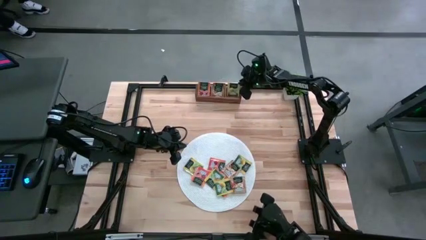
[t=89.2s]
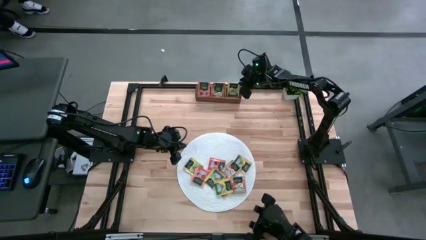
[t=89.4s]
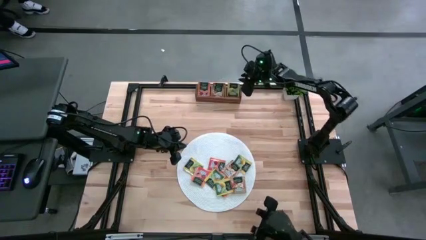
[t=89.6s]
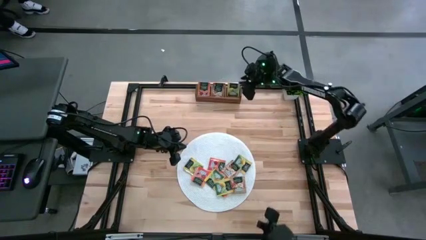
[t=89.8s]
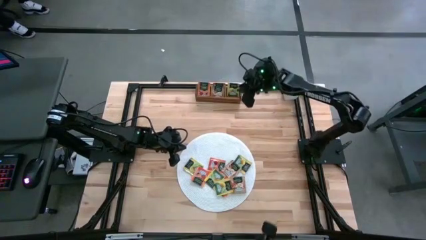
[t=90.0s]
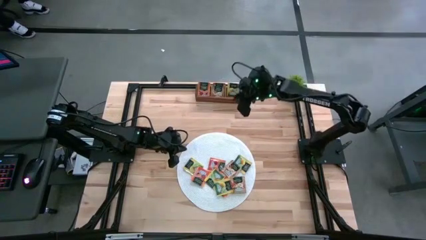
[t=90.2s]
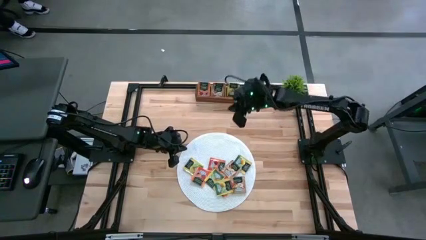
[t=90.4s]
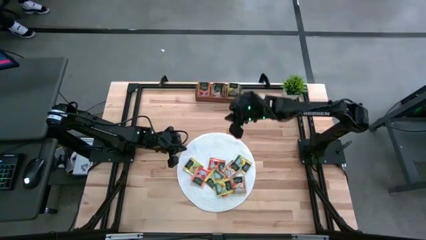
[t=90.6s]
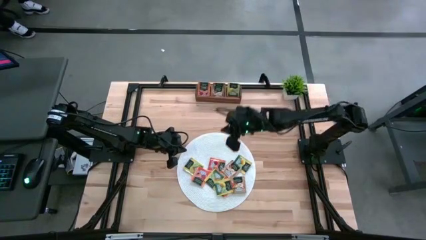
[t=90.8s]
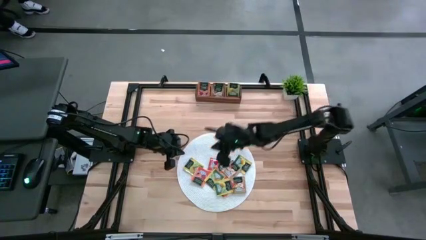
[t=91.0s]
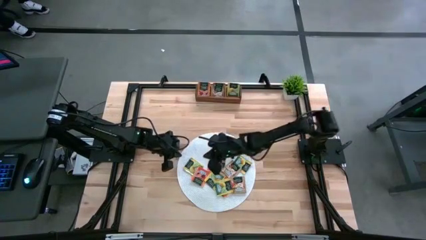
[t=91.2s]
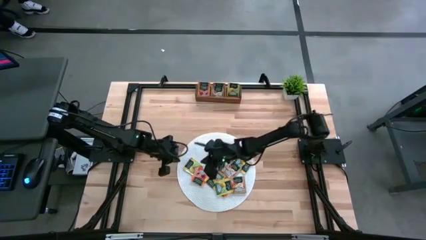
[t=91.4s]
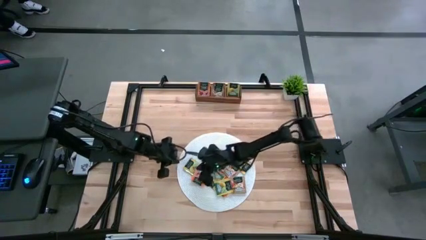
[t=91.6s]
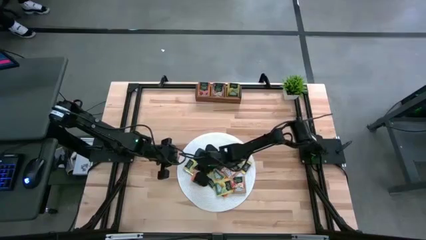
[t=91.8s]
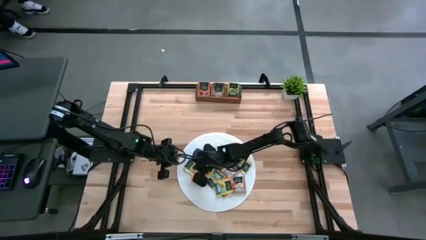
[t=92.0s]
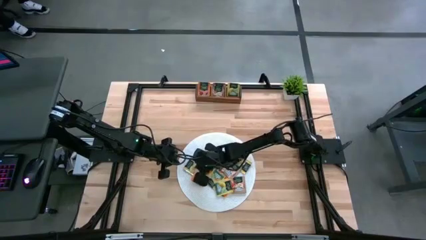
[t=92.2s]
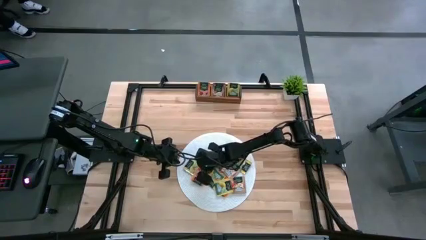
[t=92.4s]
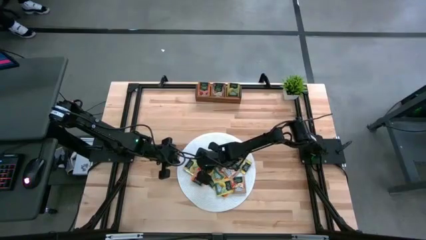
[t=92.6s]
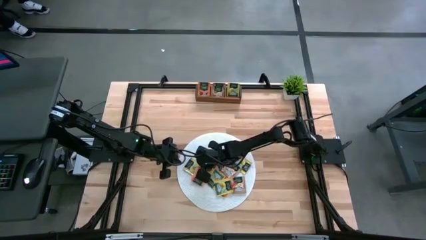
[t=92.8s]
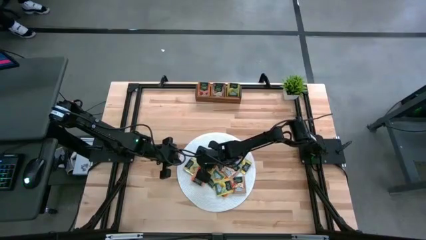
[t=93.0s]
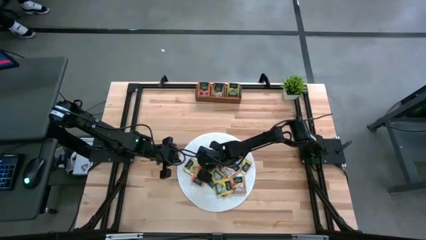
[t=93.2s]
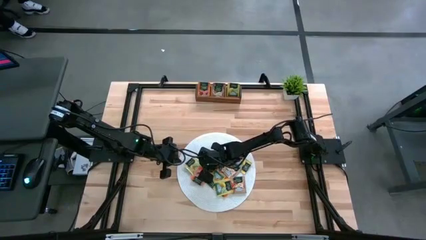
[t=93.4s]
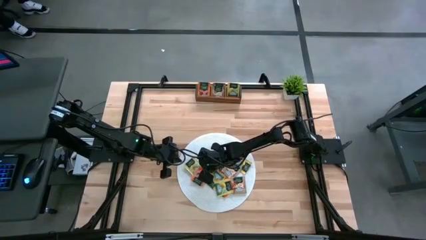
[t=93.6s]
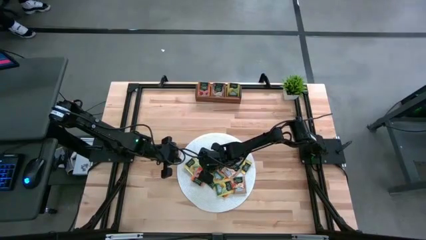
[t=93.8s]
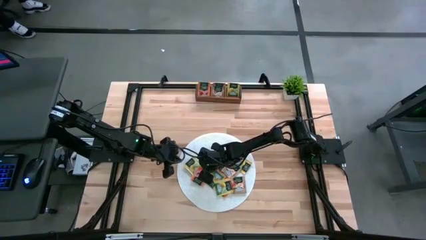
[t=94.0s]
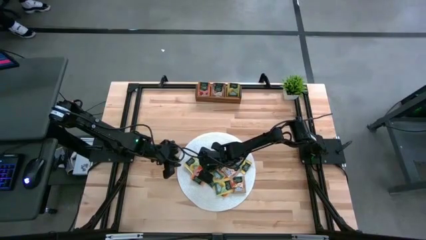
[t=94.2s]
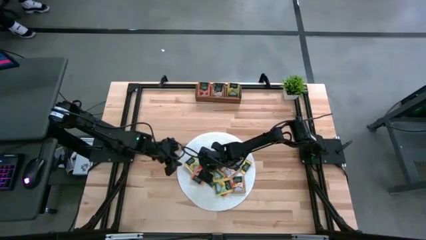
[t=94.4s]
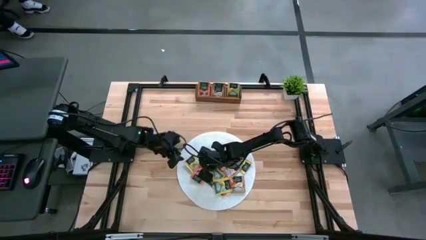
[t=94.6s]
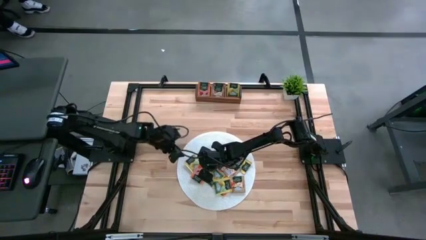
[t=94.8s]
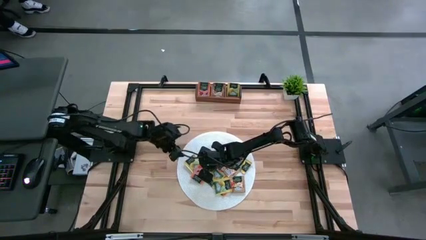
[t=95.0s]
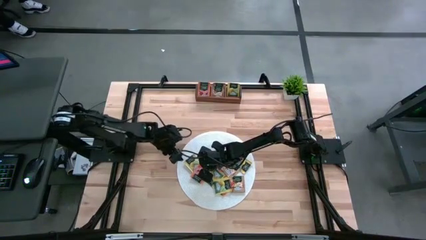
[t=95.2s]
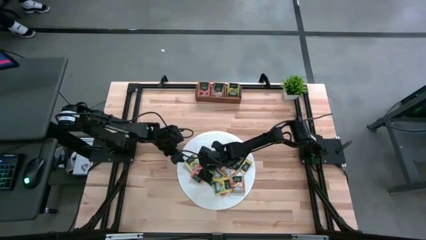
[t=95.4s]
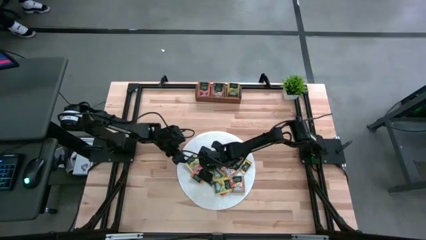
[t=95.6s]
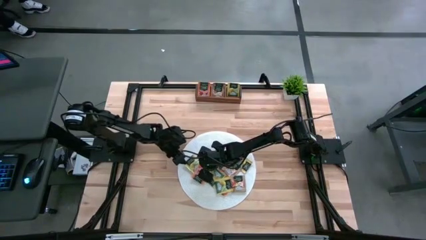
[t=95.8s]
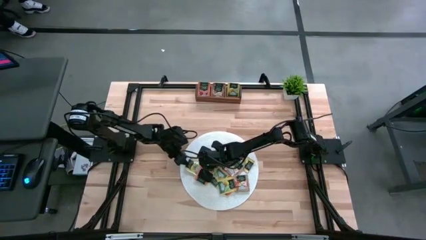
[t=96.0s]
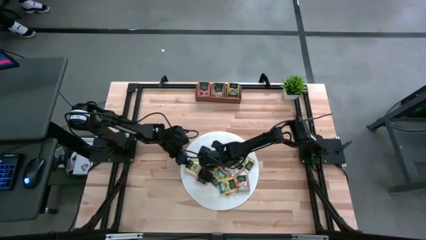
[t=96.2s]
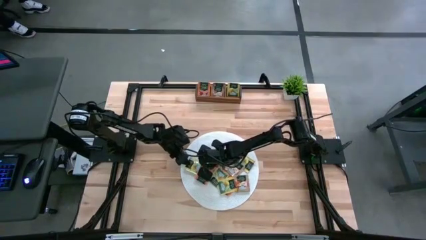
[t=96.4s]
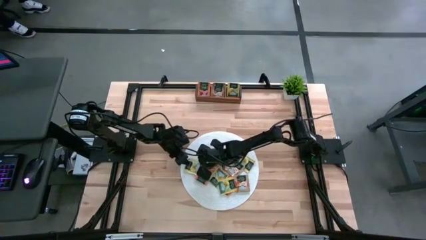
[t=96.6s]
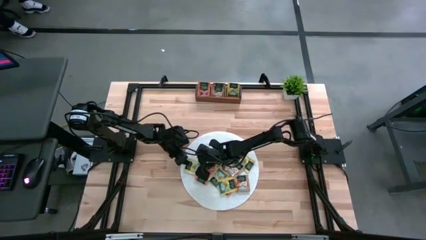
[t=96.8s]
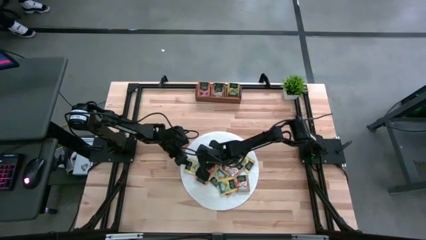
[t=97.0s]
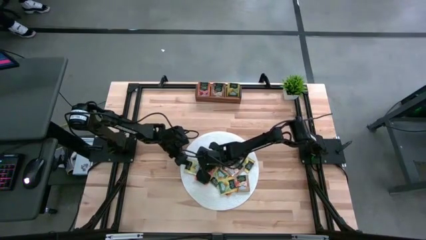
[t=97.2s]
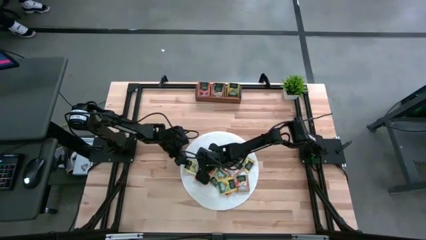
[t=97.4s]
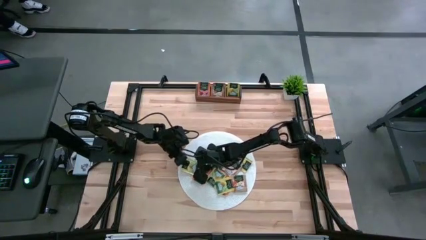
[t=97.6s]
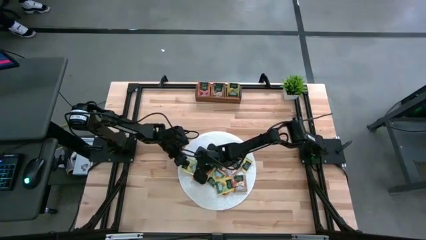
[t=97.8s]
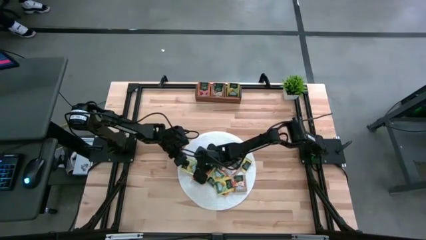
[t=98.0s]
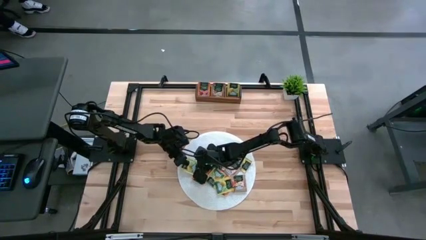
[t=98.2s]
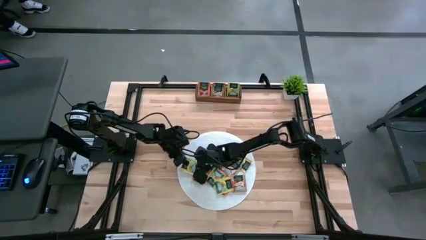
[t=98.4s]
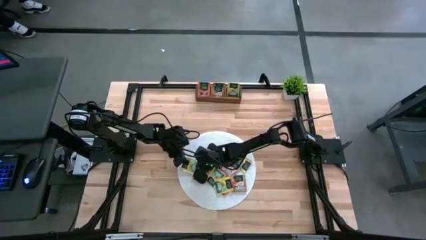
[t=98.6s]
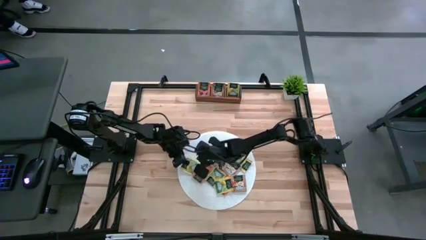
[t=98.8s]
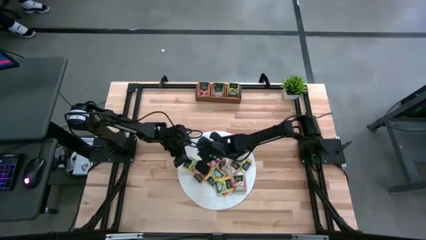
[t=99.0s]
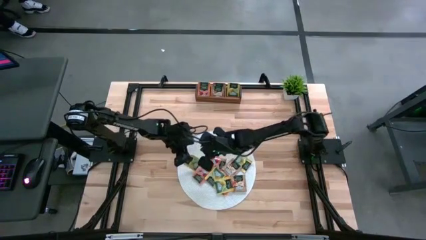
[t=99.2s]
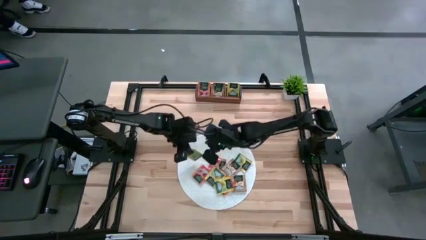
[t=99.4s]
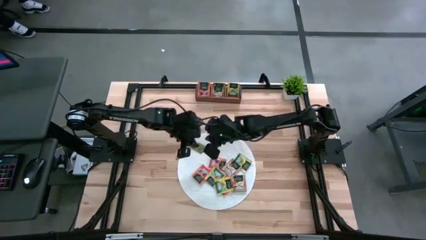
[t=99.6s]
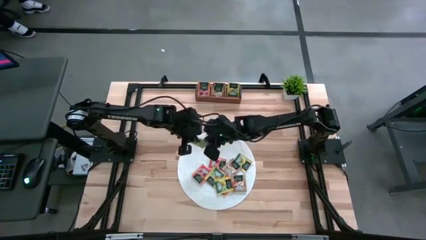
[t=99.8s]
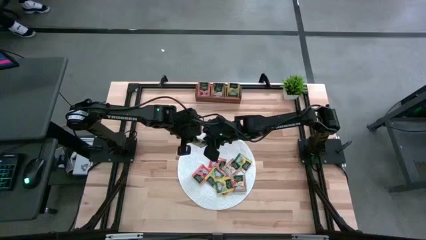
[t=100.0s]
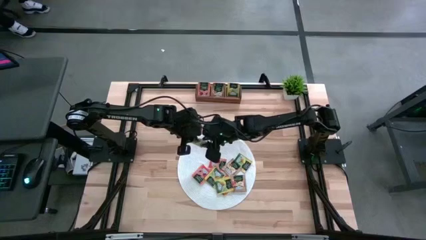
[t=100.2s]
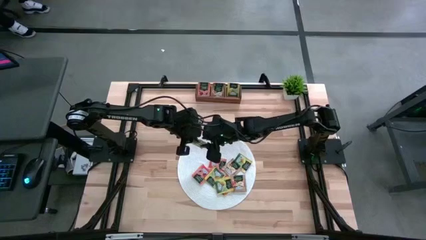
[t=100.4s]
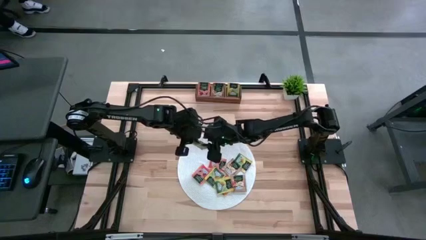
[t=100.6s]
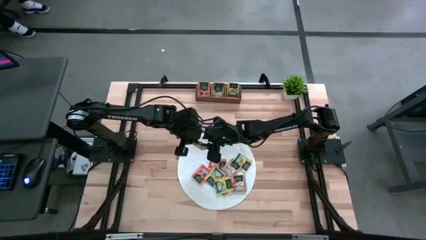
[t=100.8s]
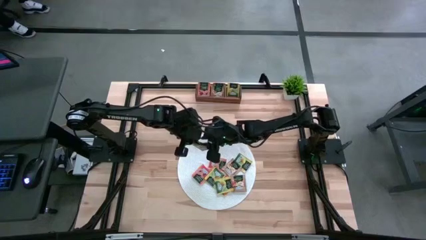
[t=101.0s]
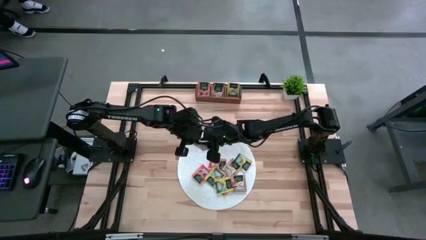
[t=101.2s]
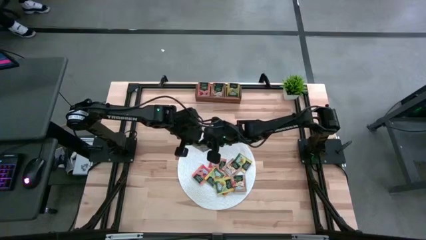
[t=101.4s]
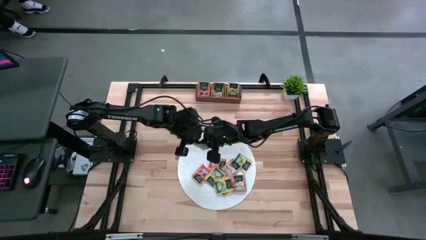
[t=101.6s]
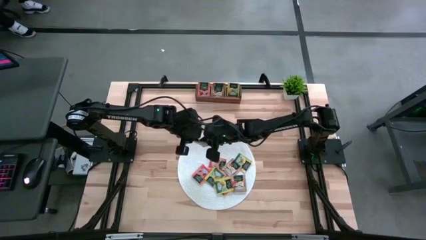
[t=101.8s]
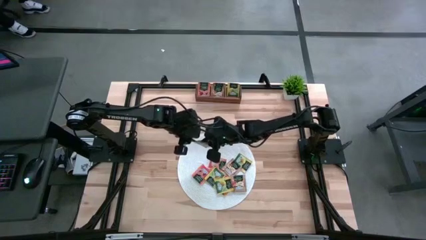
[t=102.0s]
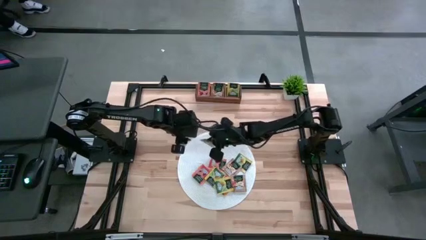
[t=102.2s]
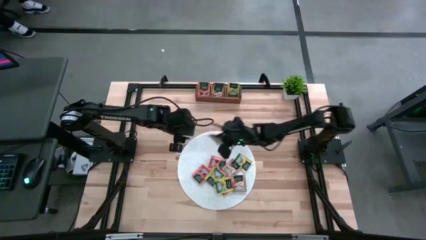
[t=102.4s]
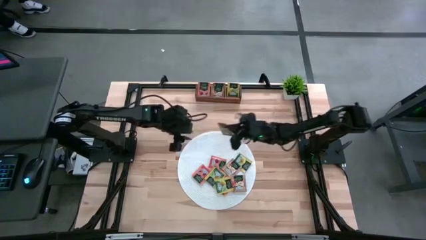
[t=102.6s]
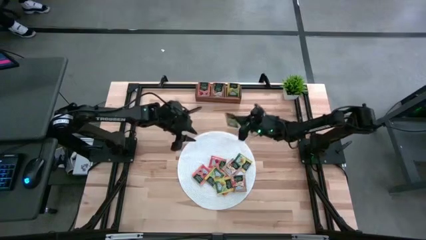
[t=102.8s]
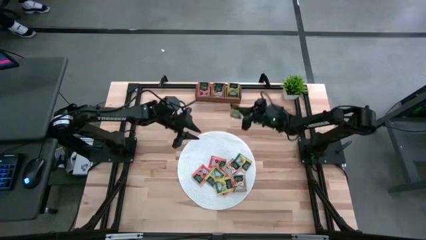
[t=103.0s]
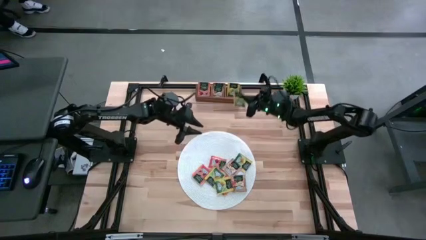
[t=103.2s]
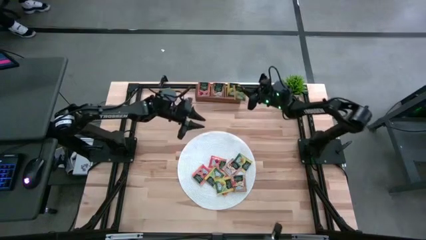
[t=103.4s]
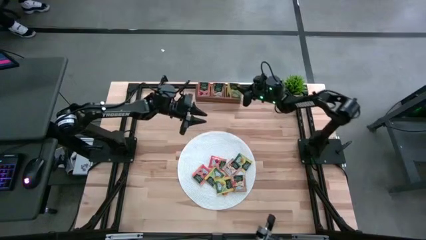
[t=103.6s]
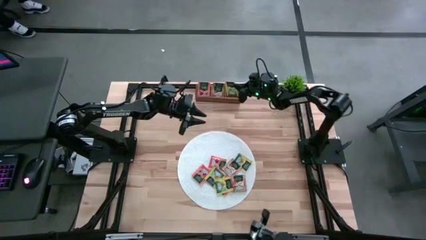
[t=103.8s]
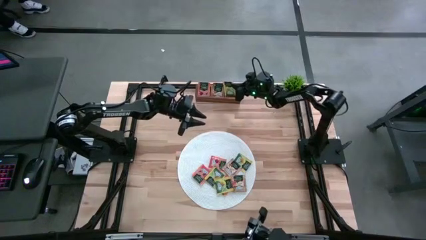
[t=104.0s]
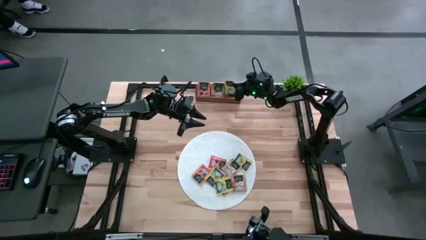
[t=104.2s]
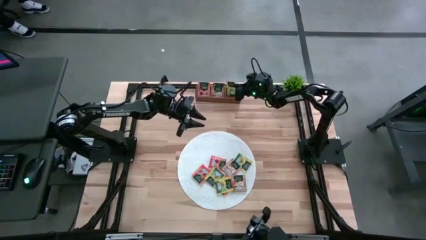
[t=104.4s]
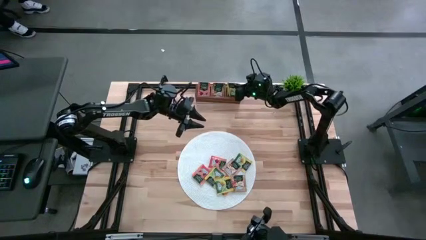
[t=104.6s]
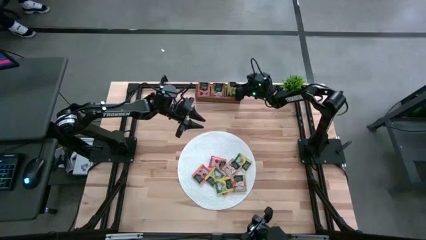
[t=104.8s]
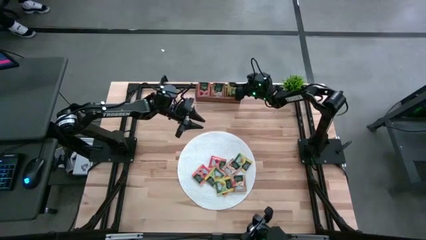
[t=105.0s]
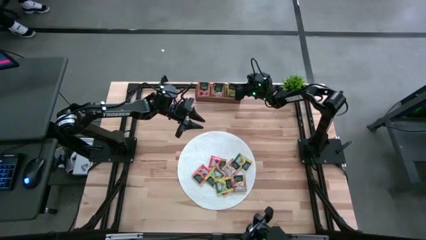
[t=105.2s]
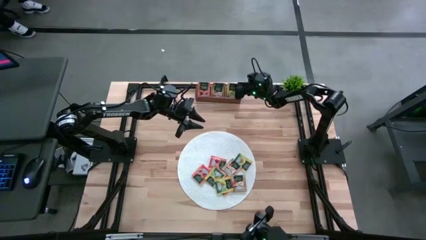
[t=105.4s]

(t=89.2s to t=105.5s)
Task: Pick & Place Tea
Put the yellow tea bag into the right section of the wooden organizer
